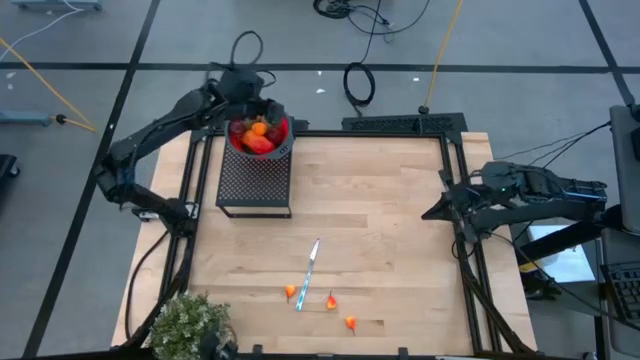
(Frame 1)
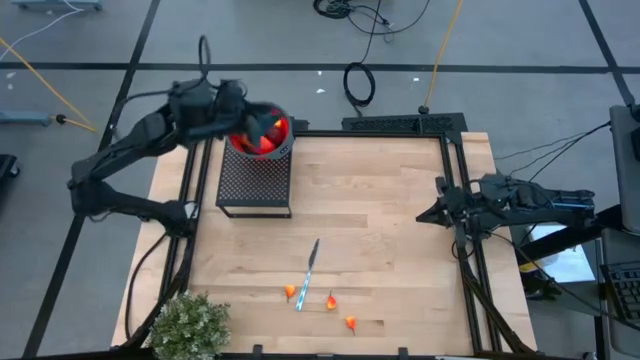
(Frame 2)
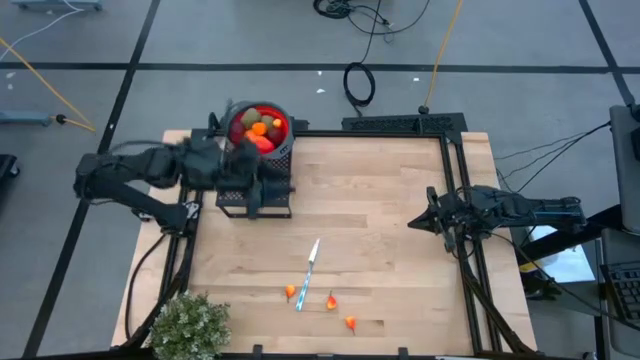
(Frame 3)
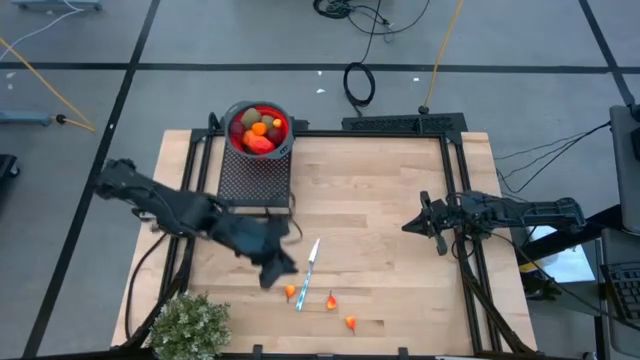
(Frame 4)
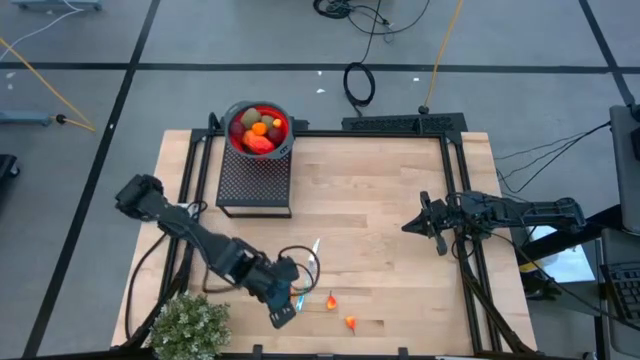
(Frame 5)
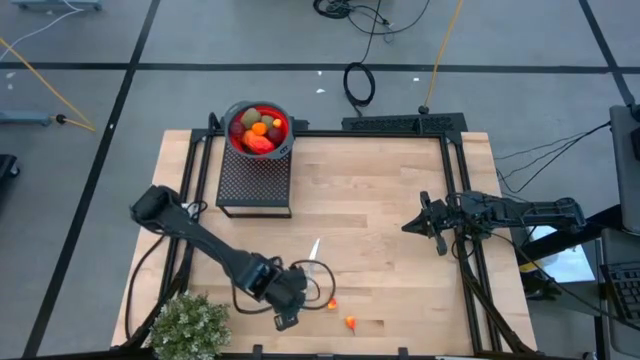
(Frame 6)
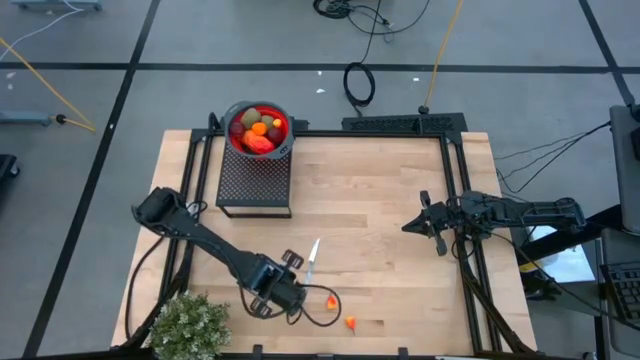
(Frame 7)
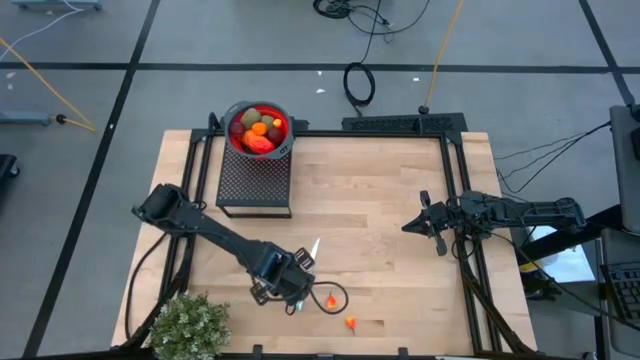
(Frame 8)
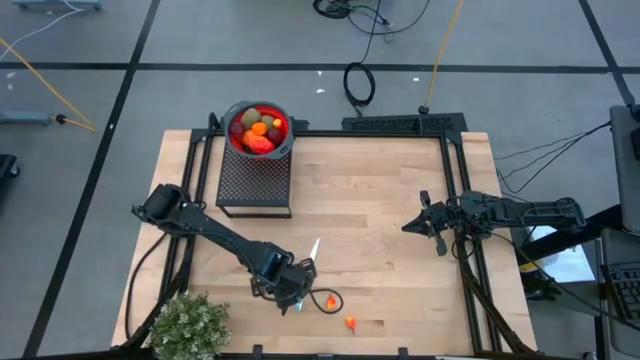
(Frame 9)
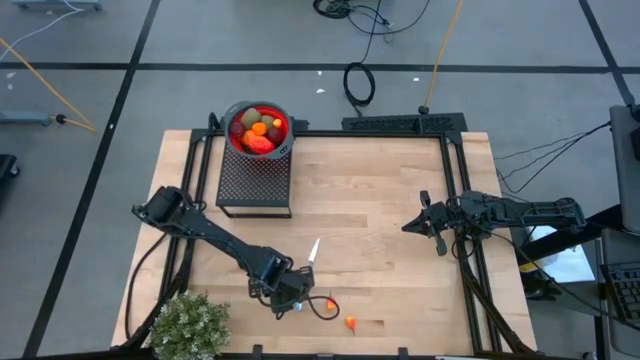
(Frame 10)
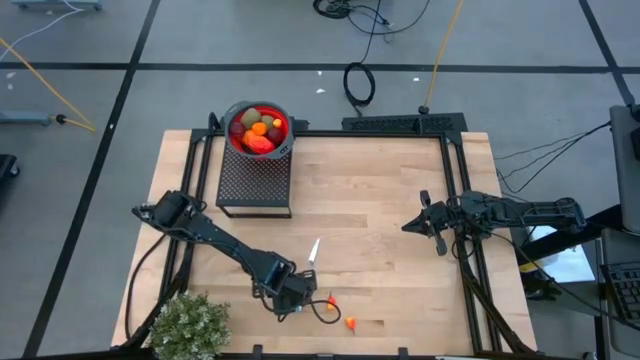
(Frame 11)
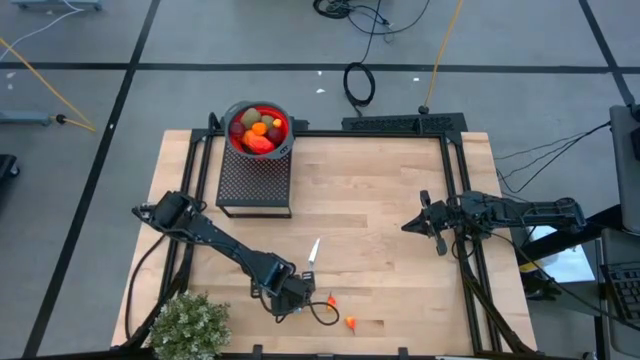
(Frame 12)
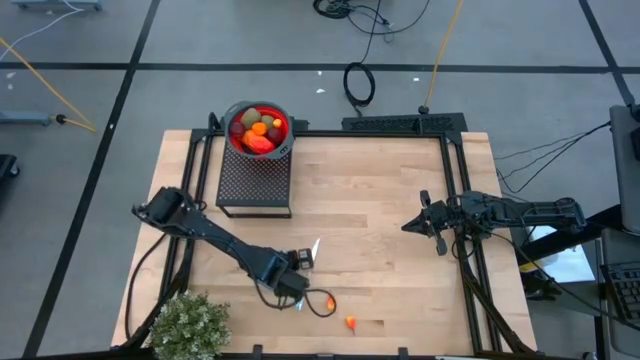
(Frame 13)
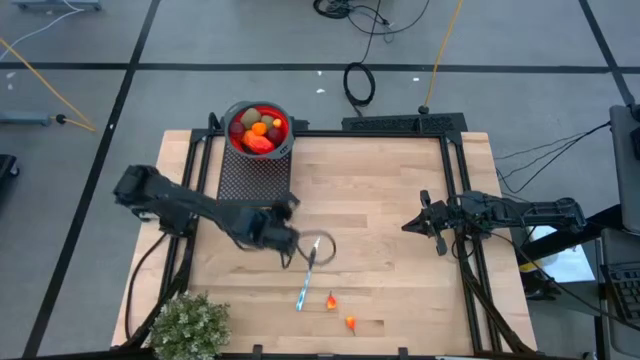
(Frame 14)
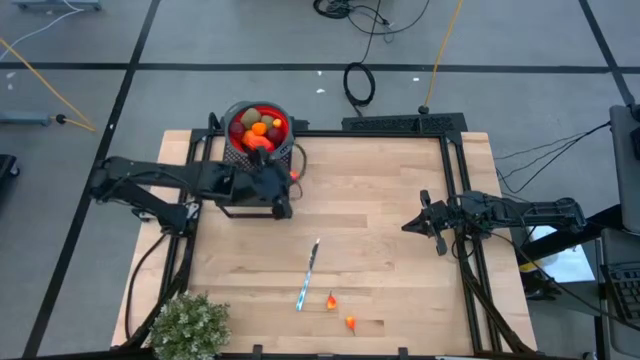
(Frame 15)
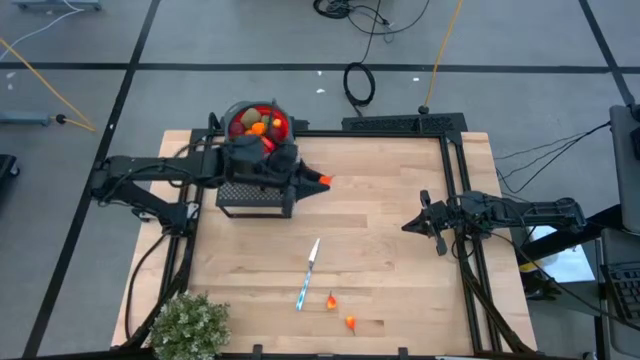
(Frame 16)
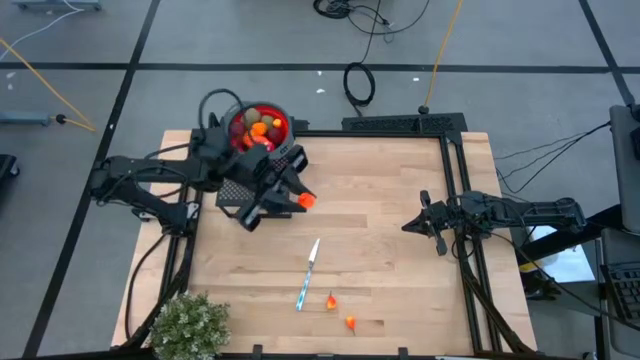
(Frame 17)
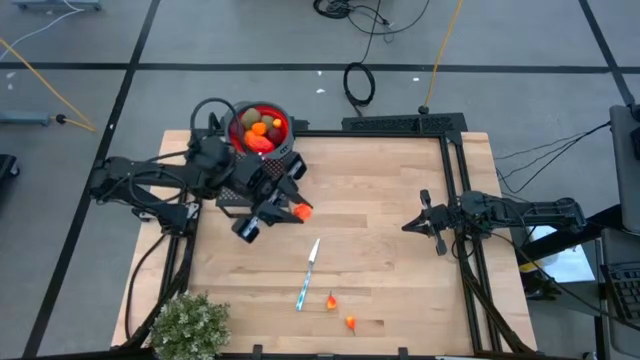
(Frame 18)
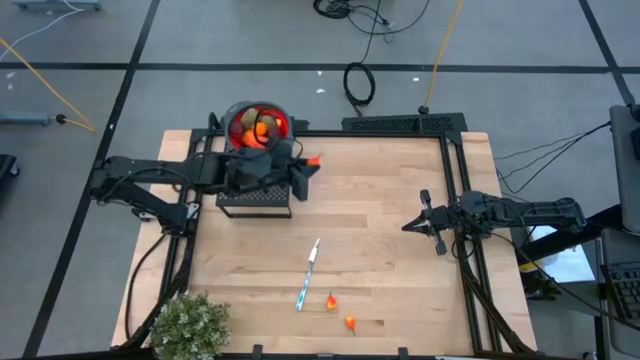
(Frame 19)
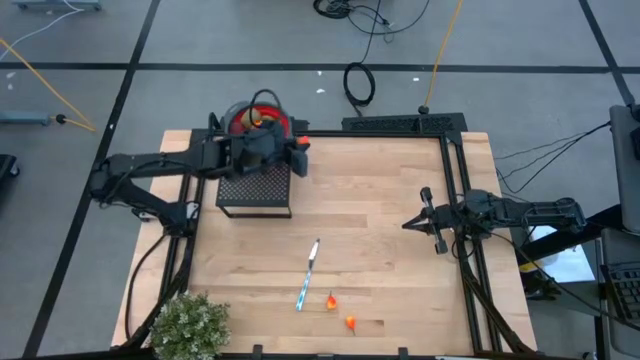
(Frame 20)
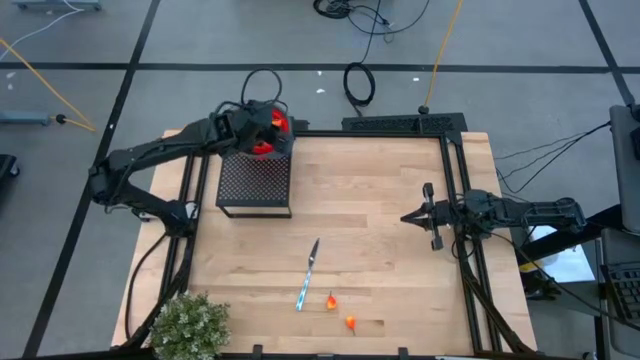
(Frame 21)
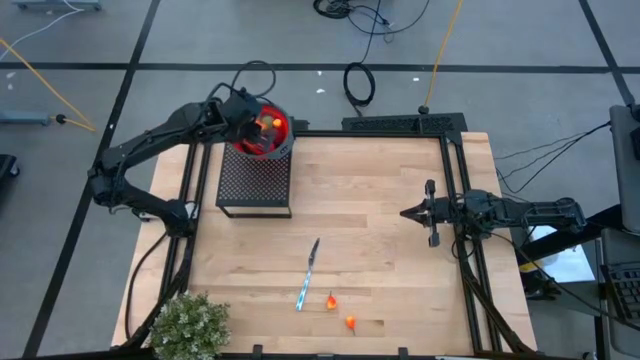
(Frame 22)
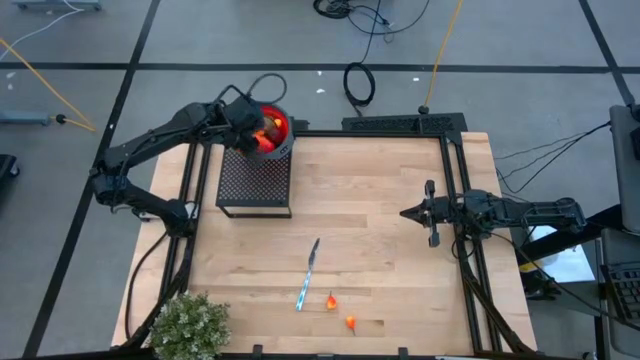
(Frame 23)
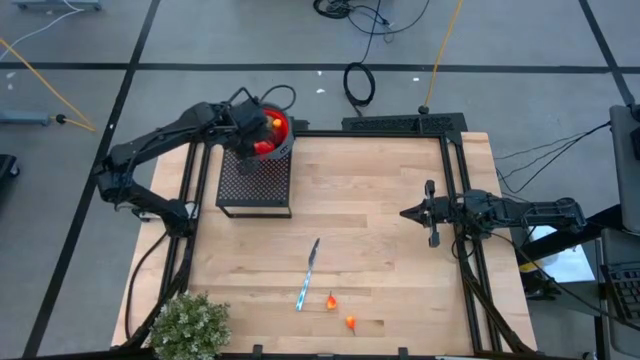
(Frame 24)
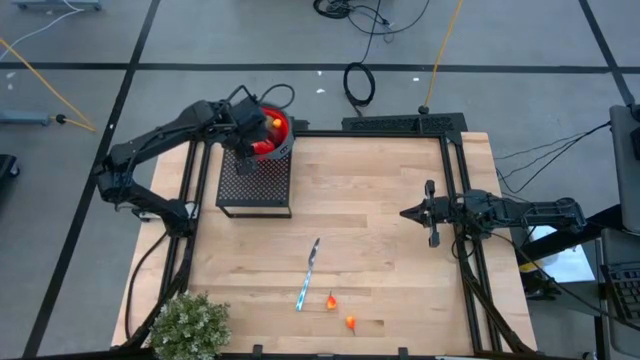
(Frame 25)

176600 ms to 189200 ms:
Task: Pick & Place Fruit
Put the orange pear into the red strainer bowl on the shelf

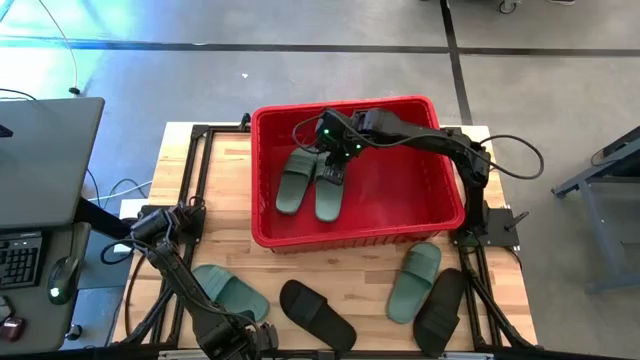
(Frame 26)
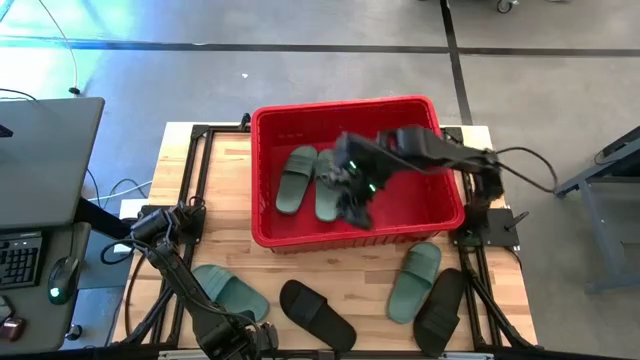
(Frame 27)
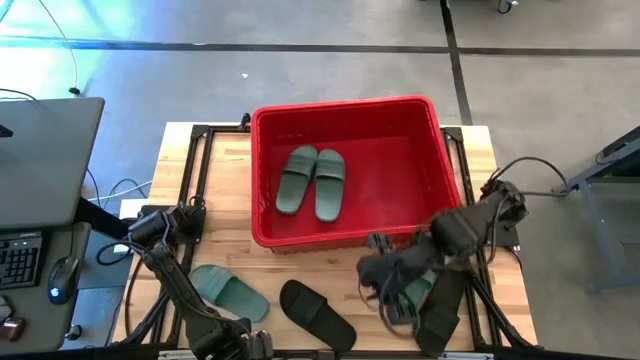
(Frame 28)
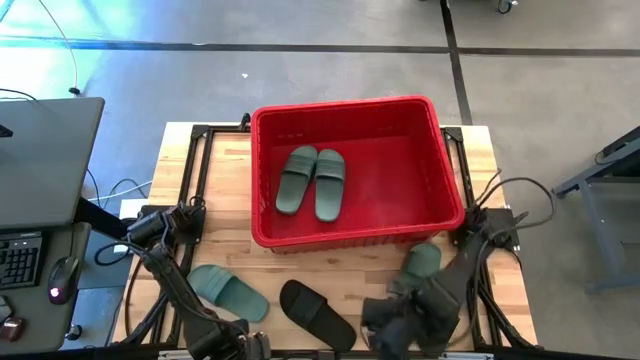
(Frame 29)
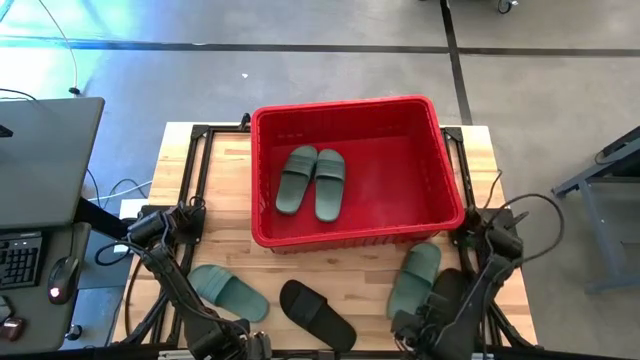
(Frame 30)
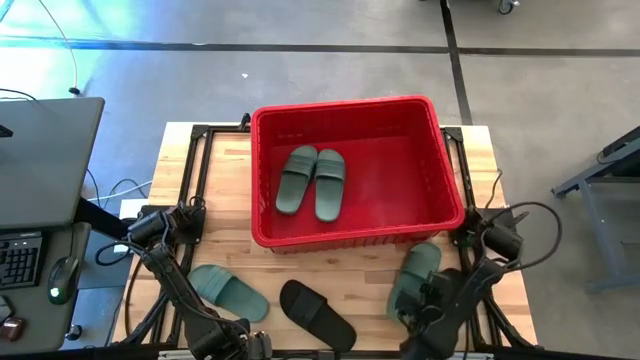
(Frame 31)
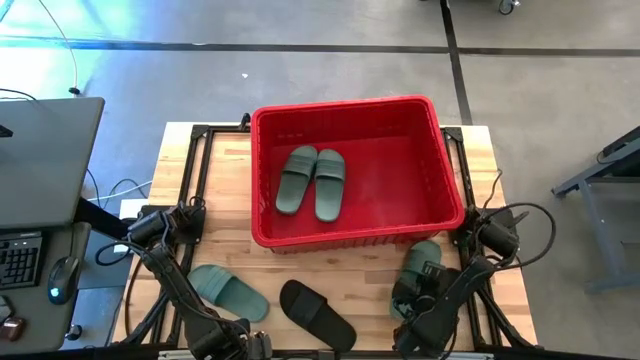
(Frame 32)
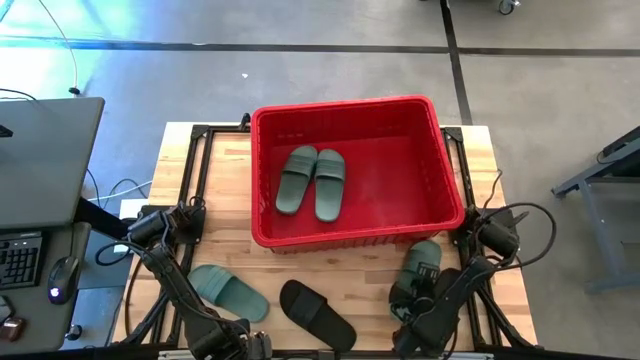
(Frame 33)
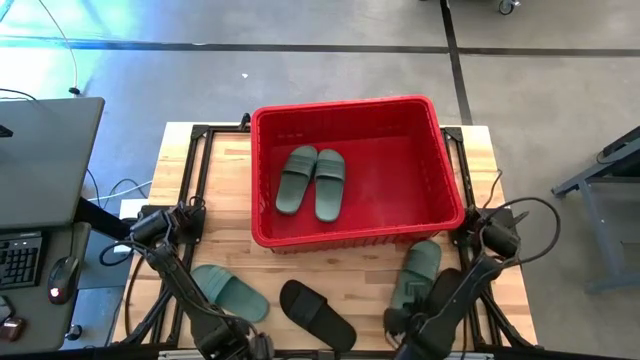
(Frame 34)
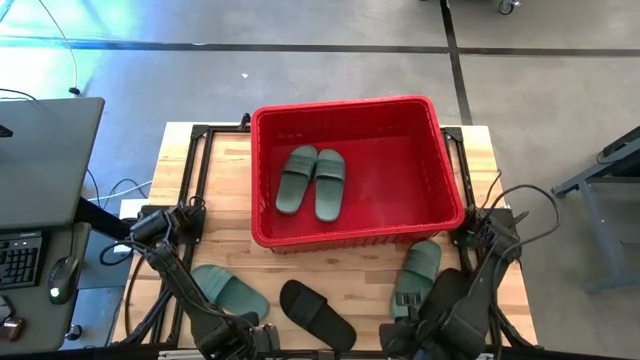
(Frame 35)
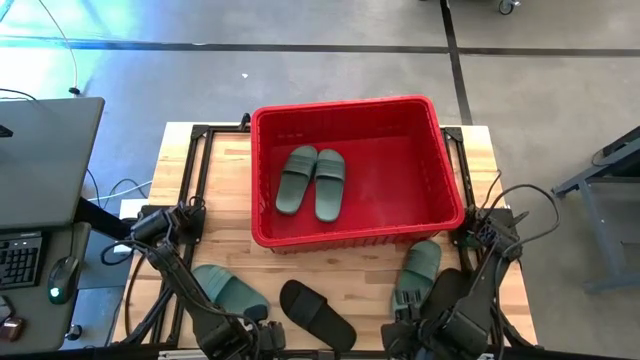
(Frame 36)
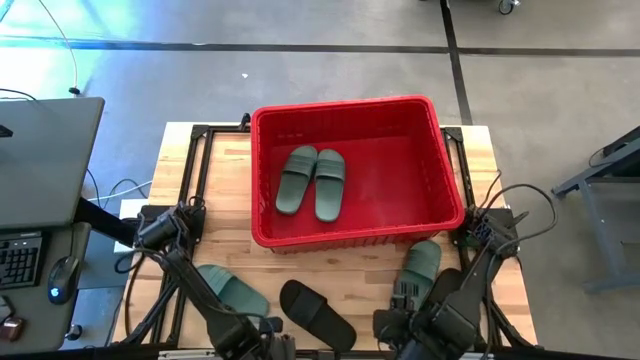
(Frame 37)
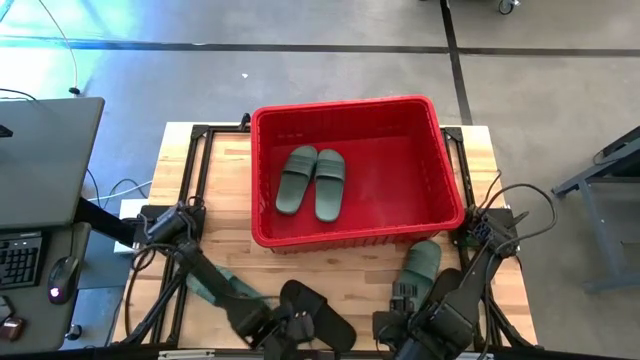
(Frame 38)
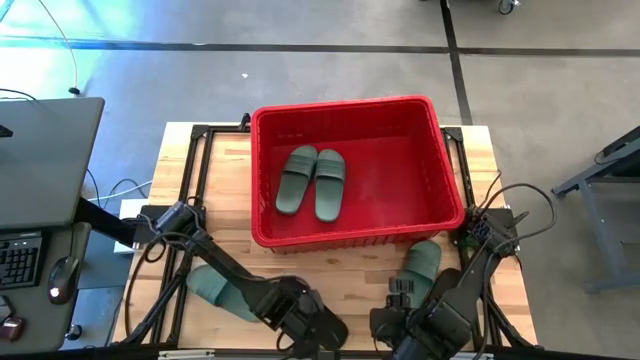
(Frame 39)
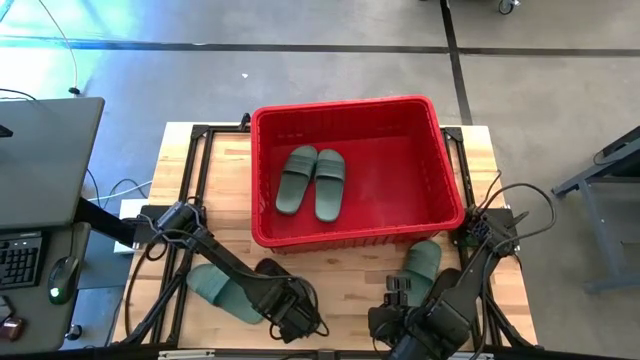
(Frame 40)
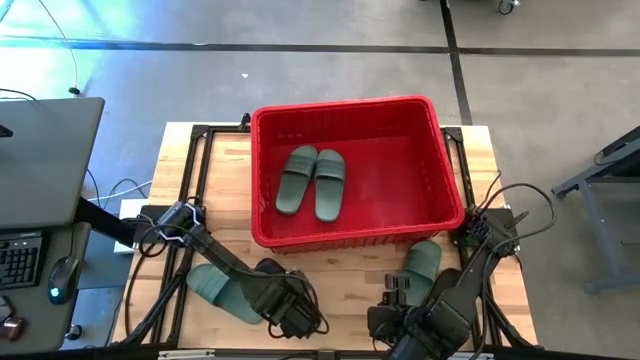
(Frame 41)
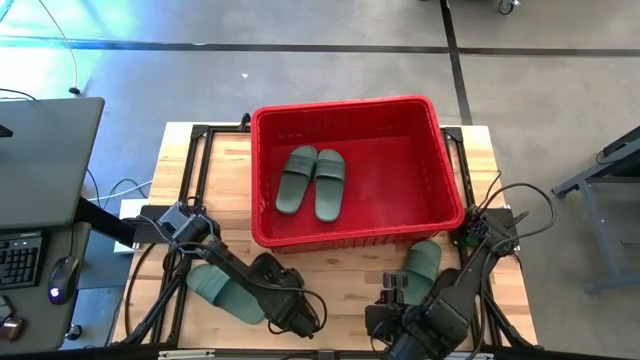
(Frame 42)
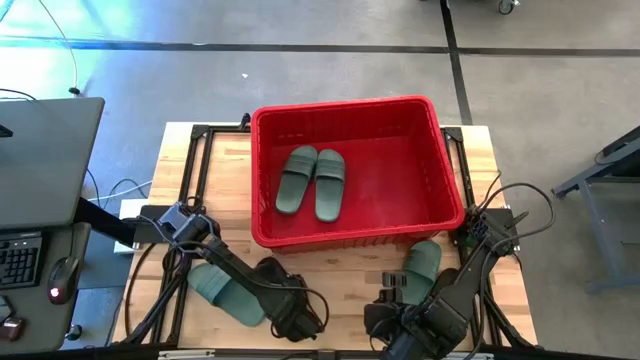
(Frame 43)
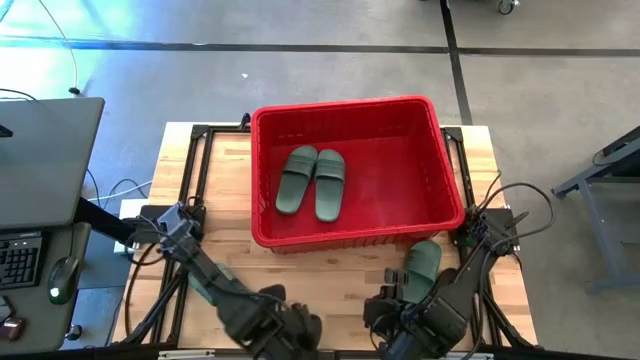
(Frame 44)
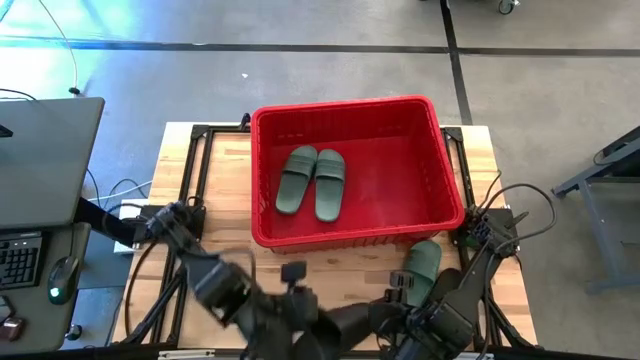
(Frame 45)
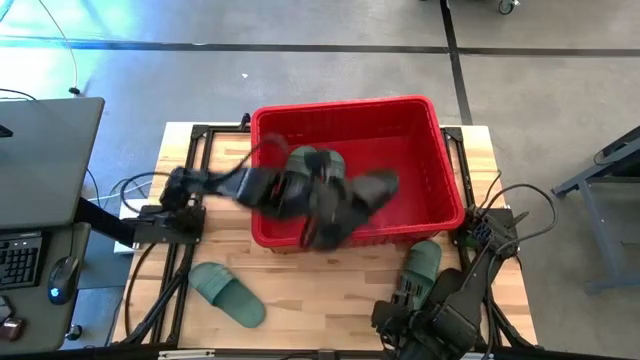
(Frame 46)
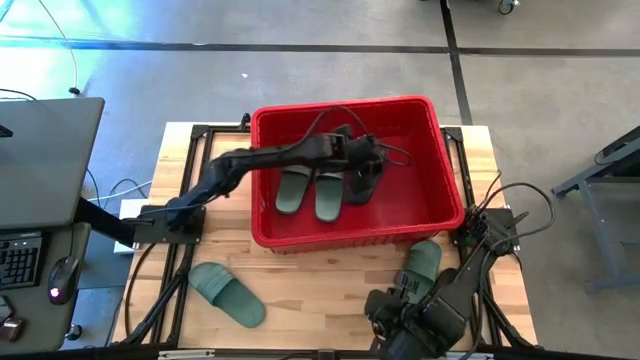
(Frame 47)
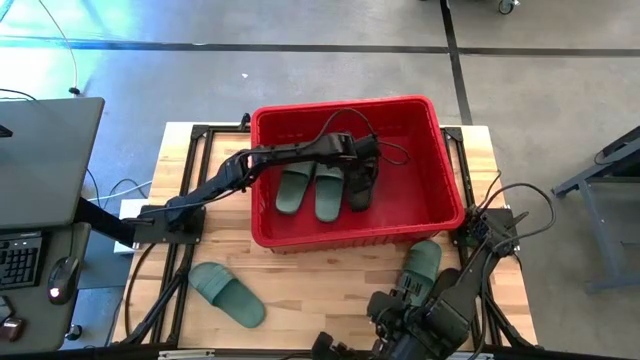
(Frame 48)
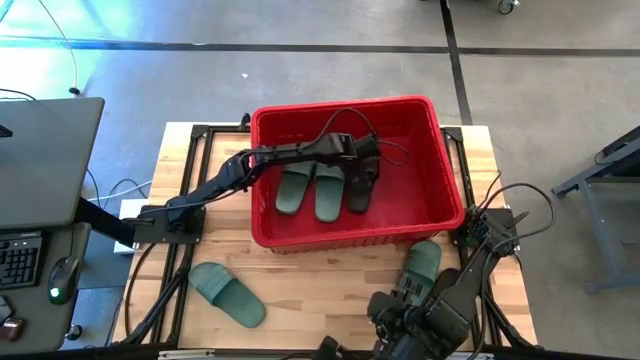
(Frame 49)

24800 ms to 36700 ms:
Task: Pick and place slides into bin
Put the black slipper into the red bin
